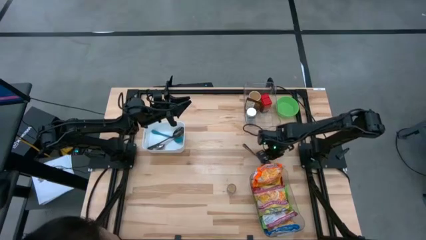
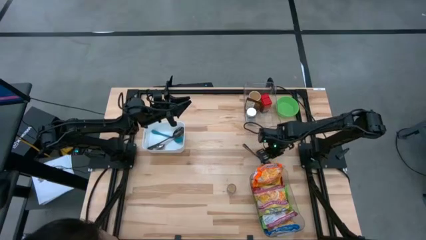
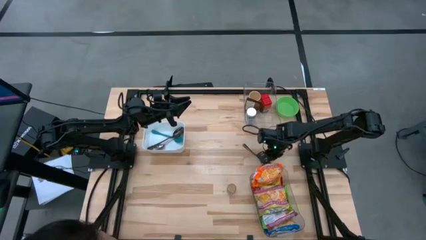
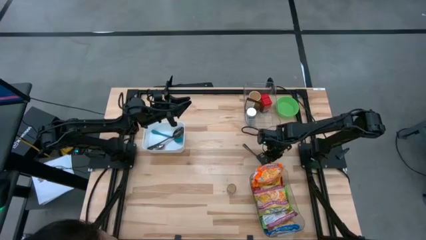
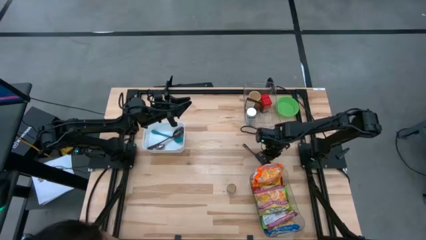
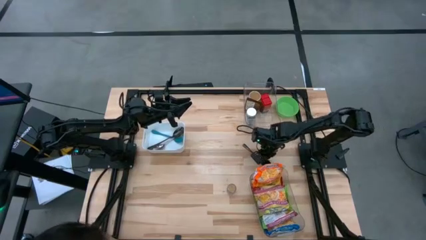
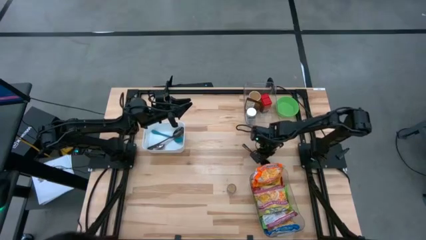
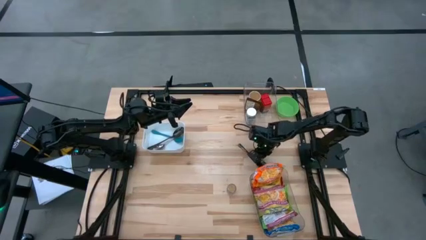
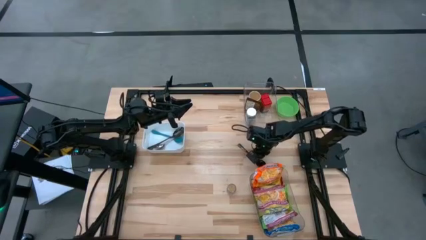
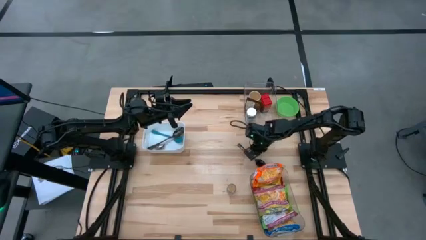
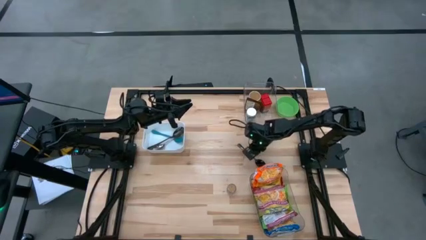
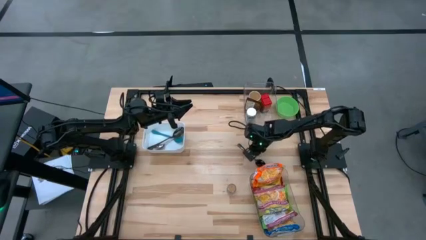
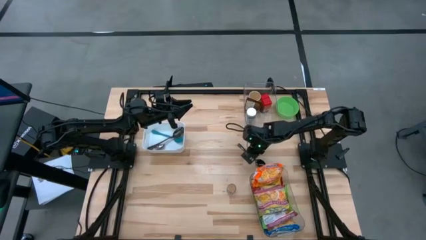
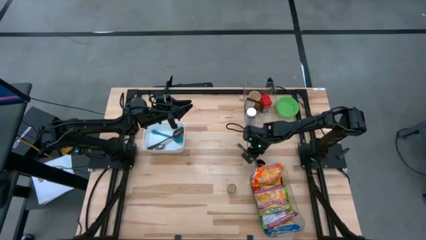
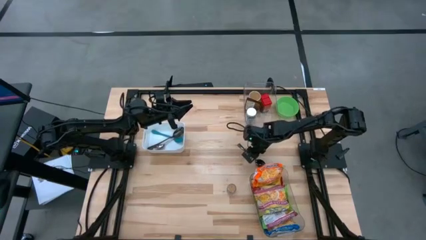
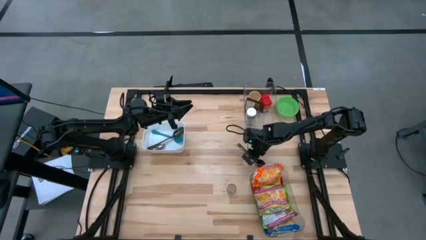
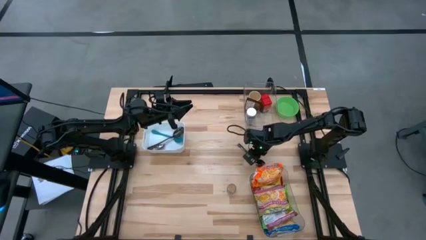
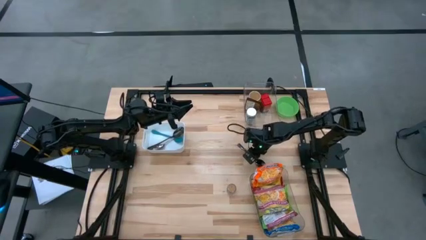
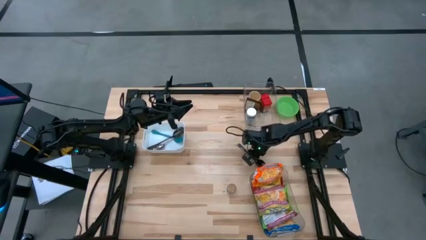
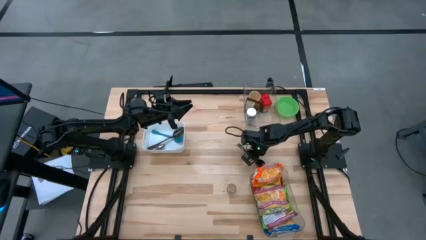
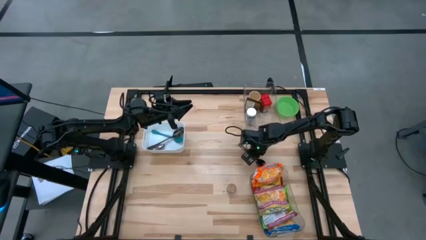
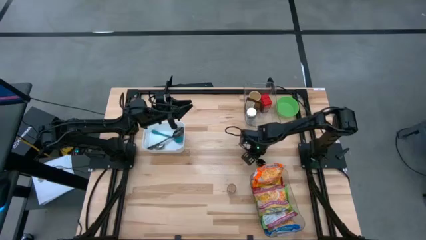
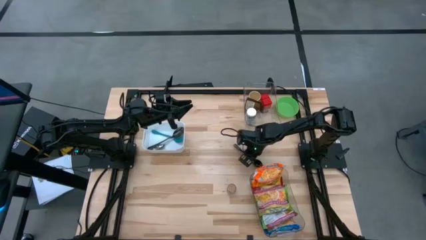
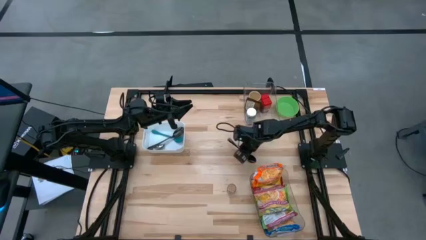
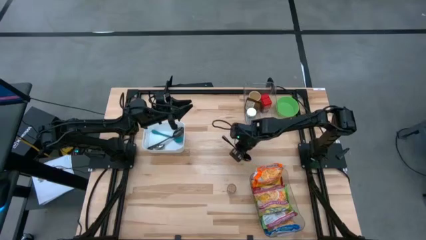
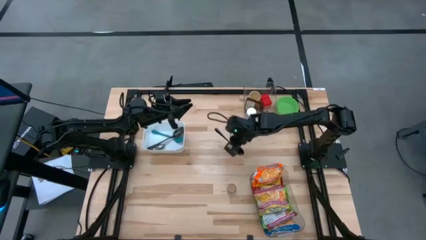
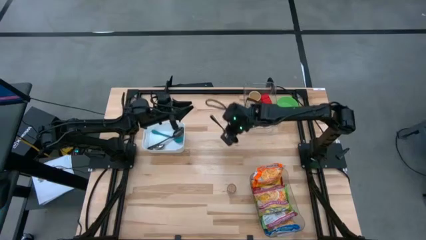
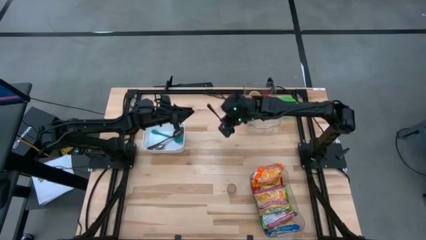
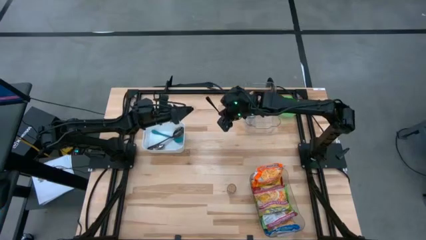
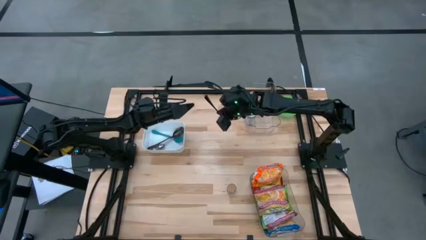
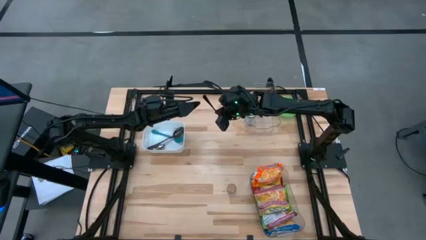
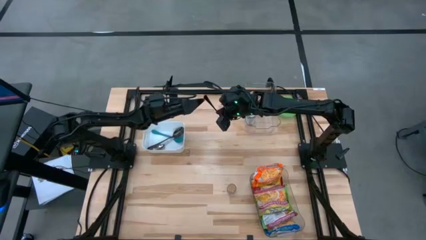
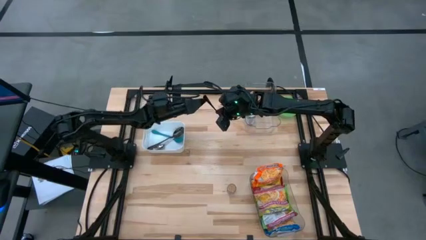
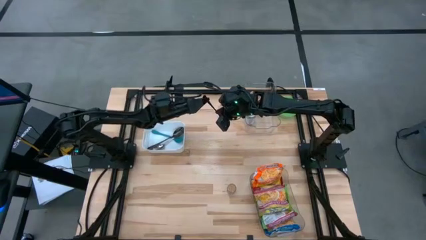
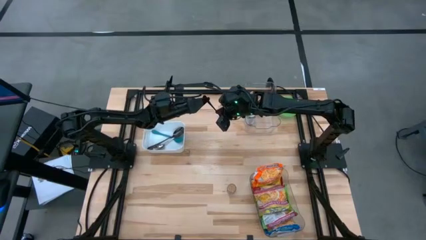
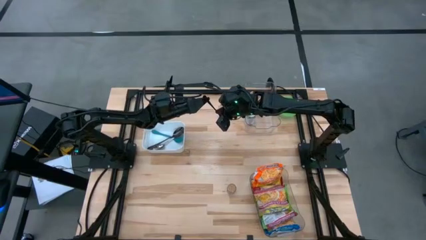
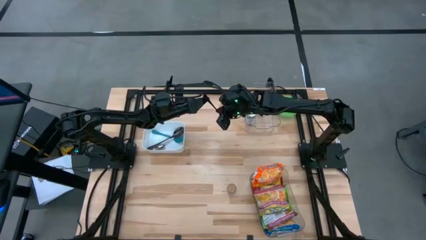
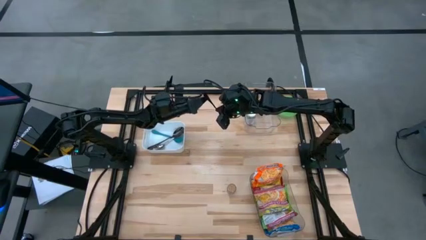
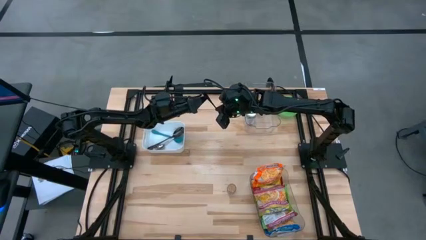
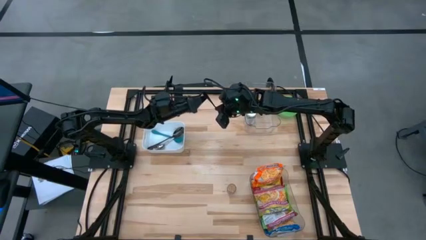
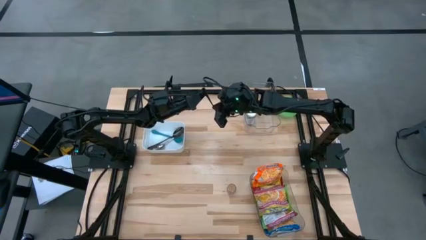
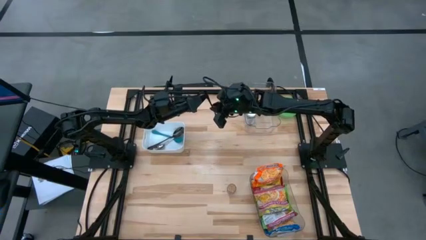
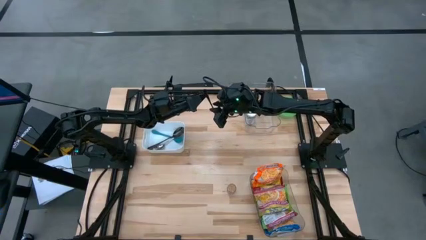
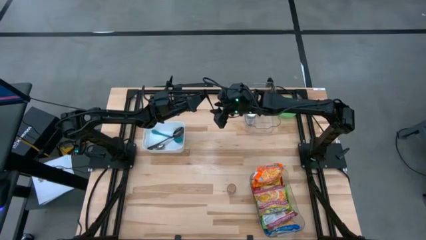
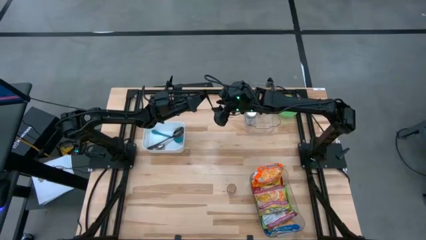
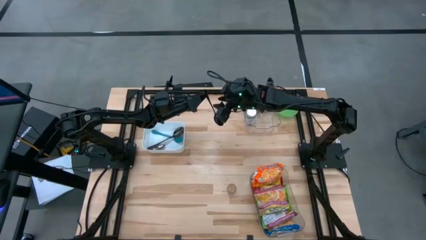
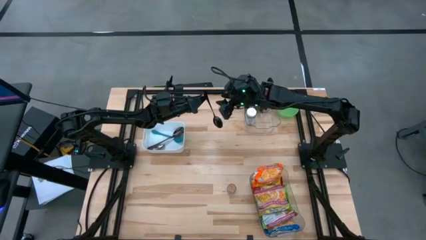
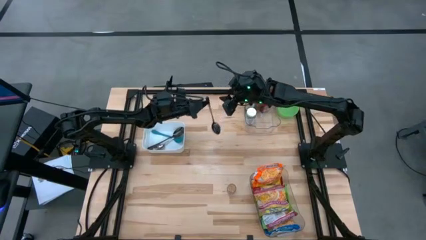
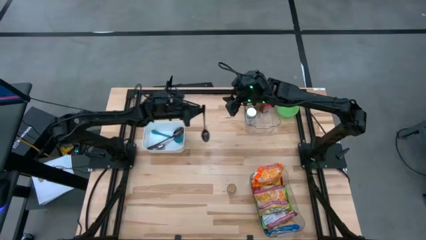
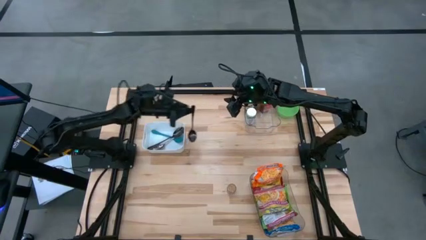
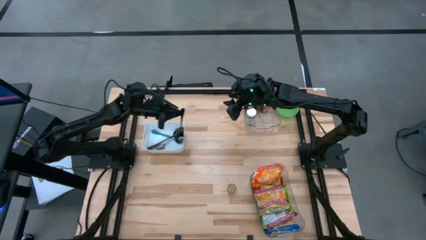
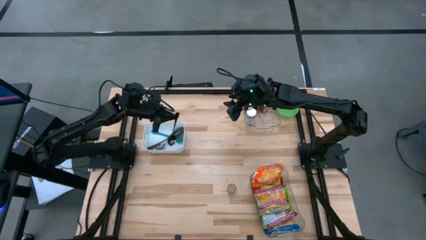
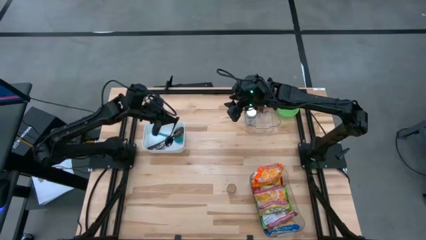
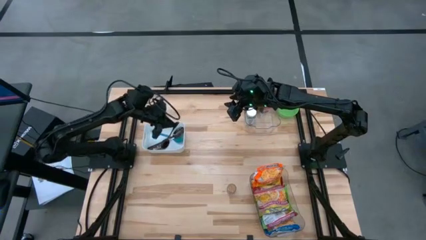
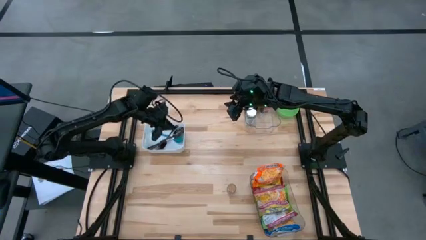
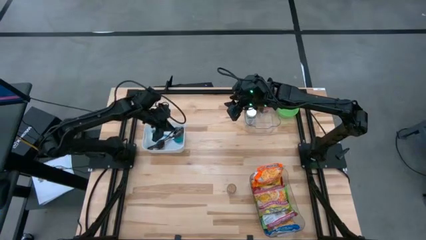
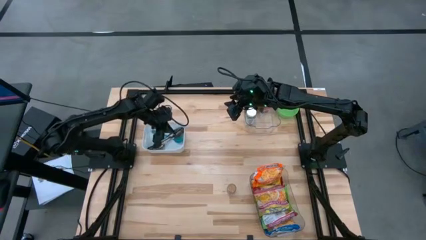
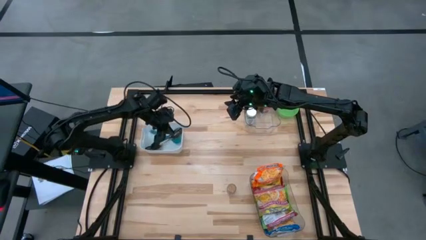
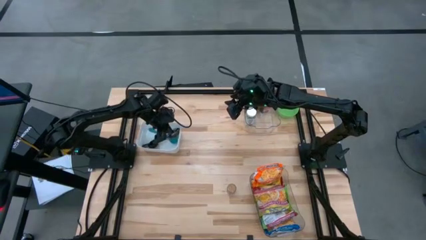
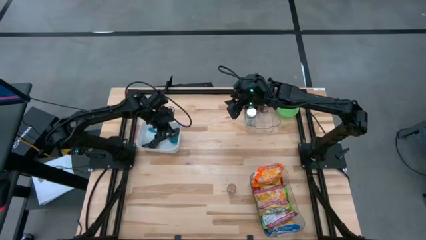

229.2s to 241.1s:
Task: Pick & Place Food Item
Put the black spoon into the white bin

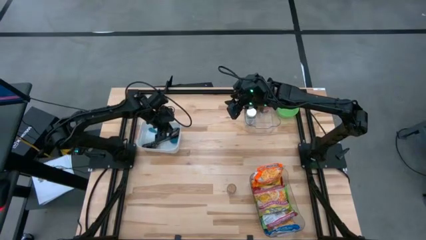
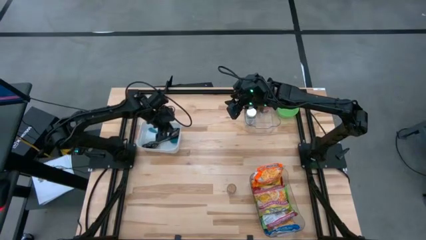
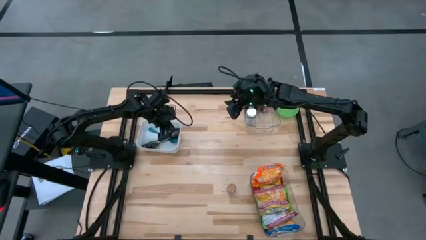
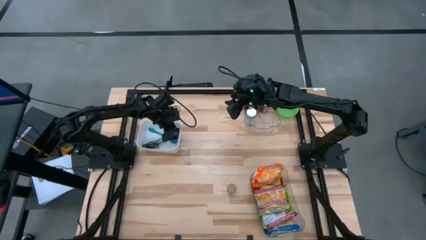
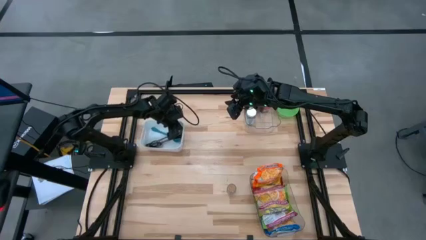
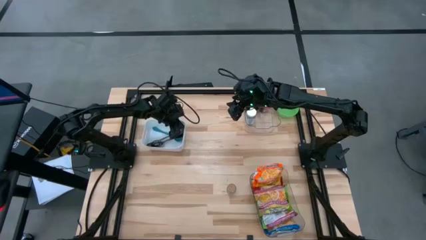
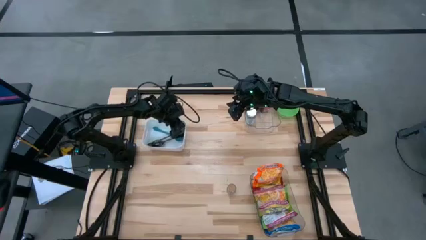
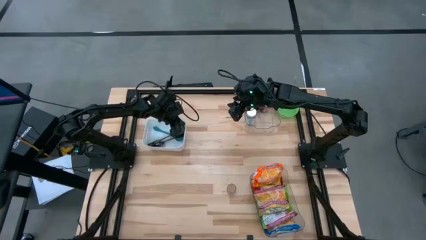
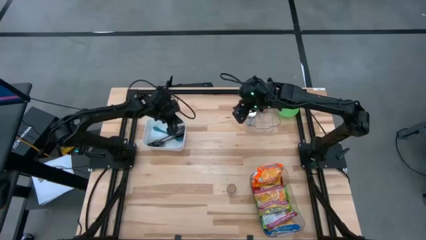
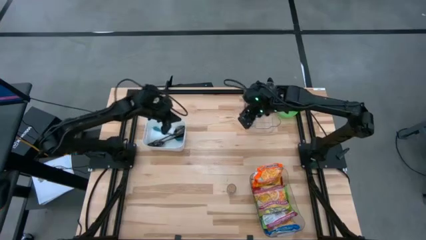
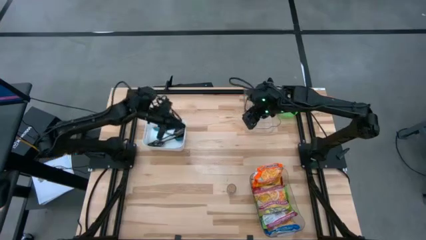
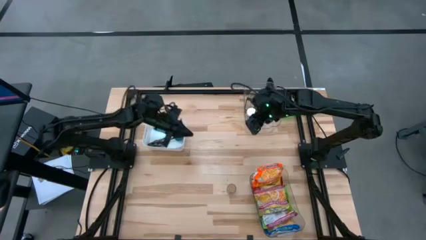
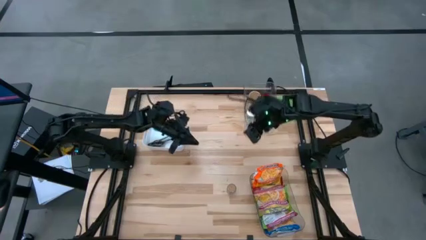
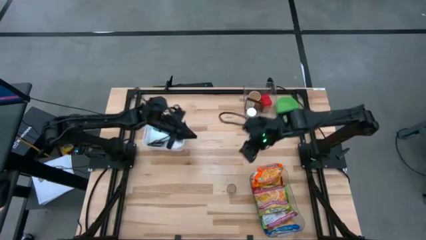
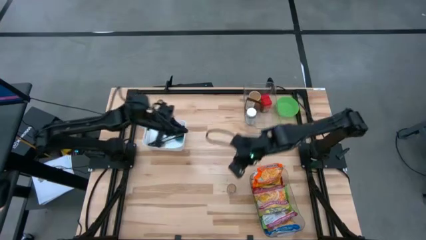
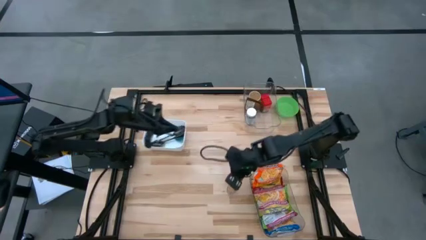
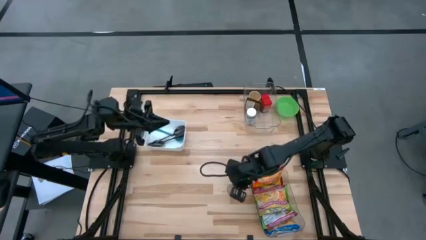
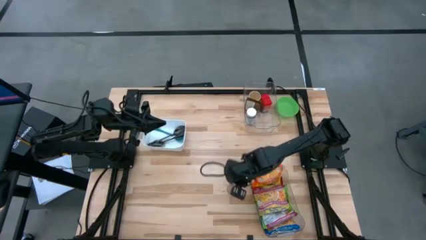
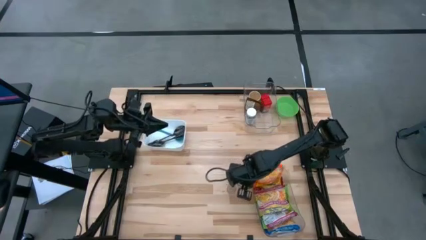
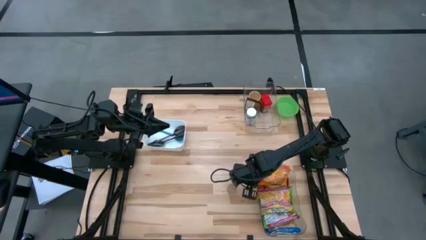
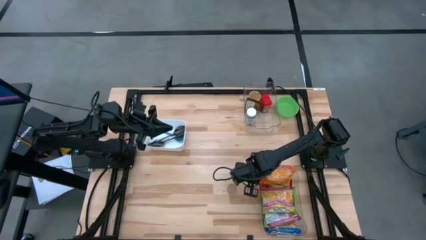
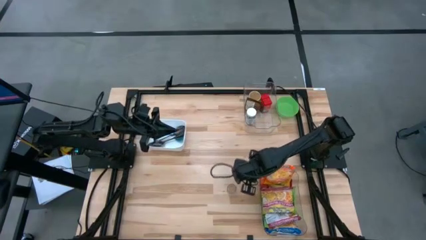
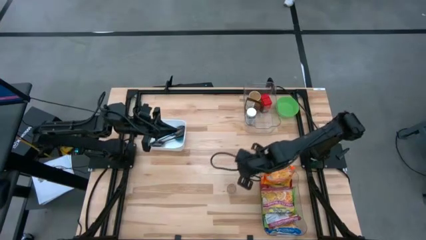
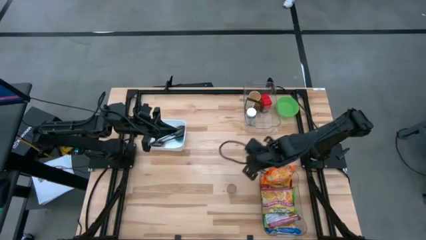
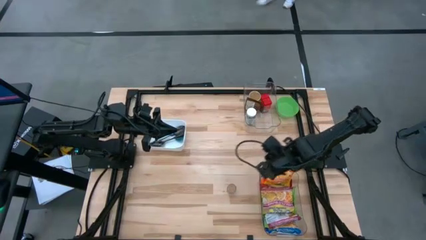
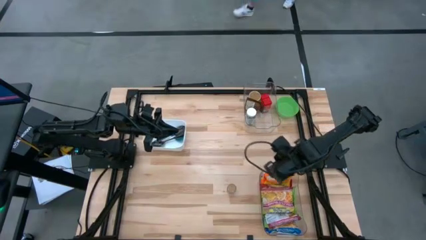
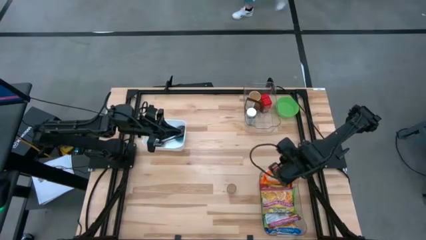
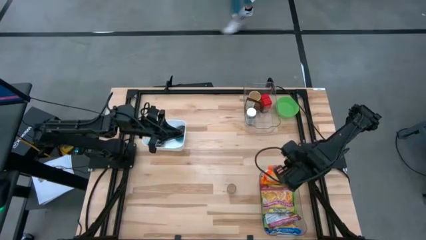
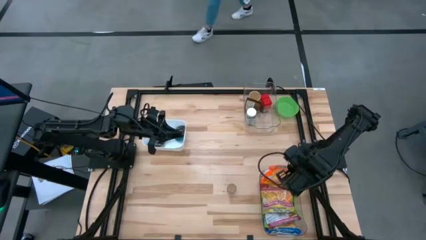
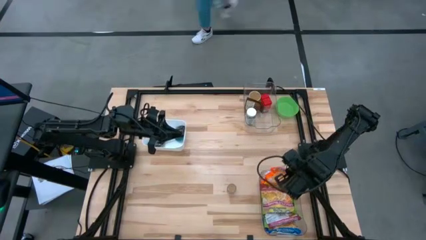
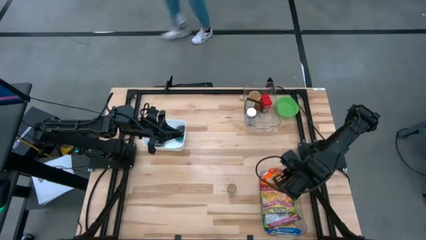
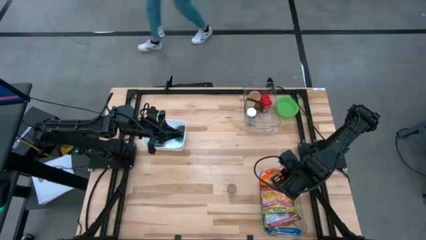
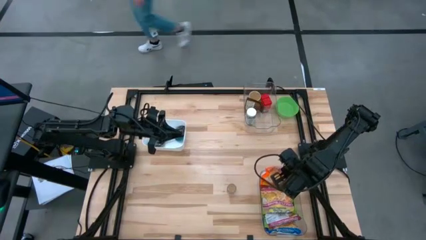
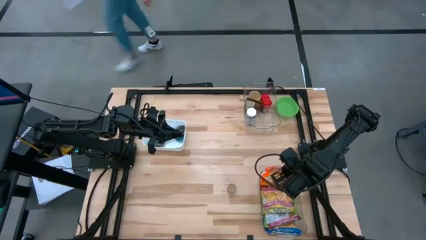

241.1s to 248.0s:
Adjust the bottom transparent bin
